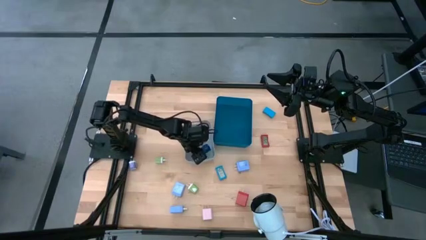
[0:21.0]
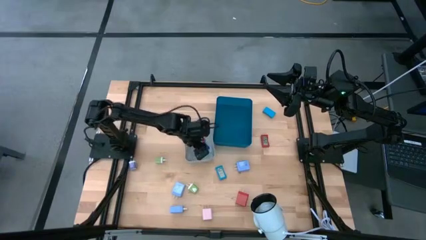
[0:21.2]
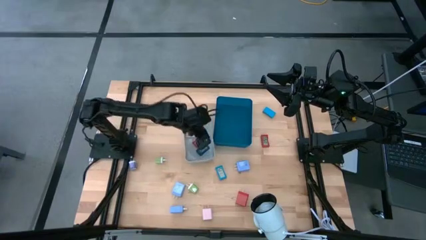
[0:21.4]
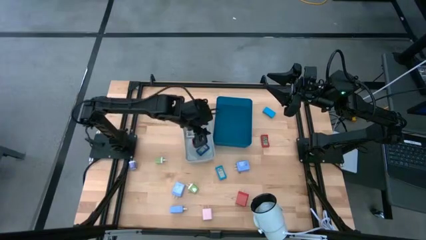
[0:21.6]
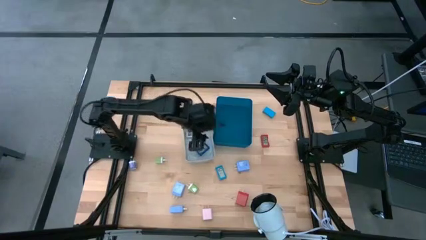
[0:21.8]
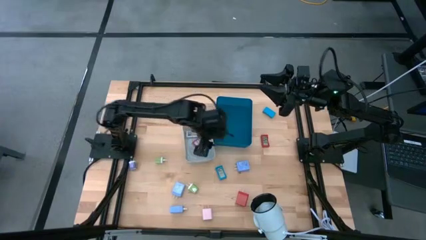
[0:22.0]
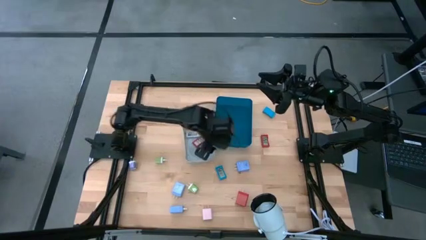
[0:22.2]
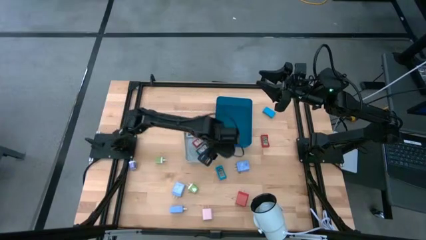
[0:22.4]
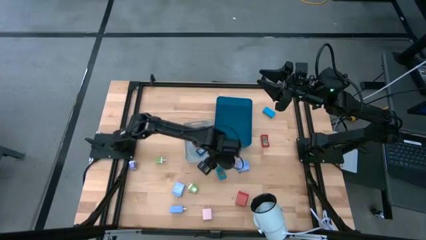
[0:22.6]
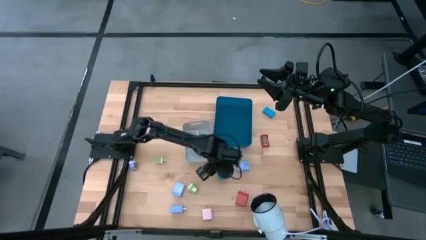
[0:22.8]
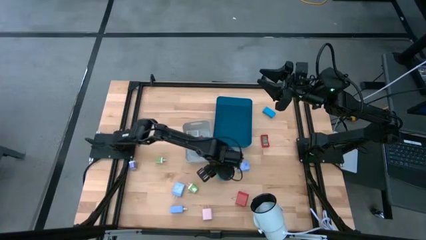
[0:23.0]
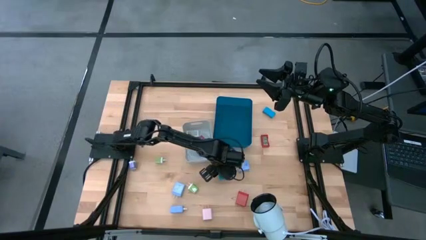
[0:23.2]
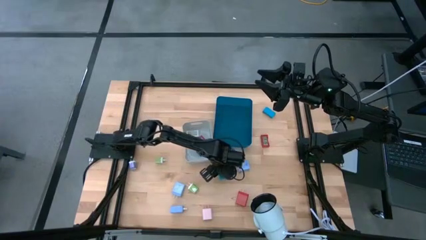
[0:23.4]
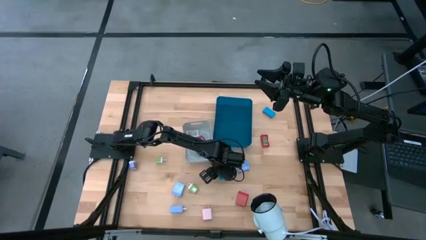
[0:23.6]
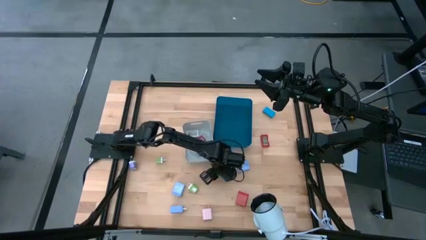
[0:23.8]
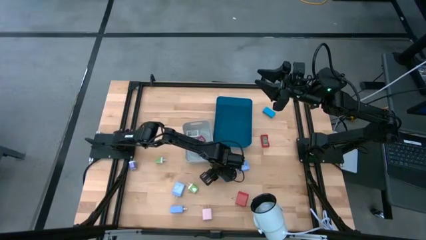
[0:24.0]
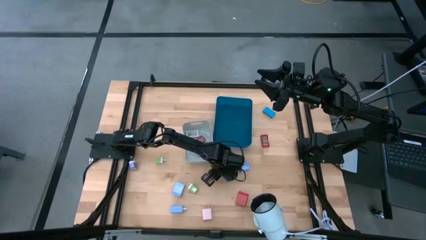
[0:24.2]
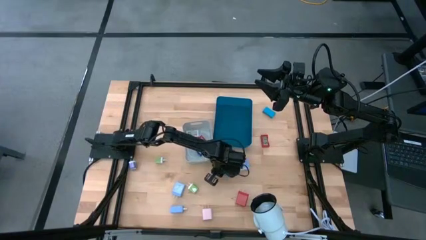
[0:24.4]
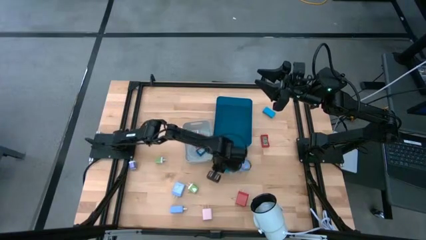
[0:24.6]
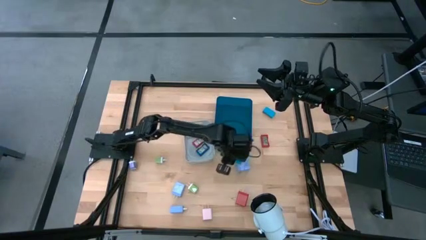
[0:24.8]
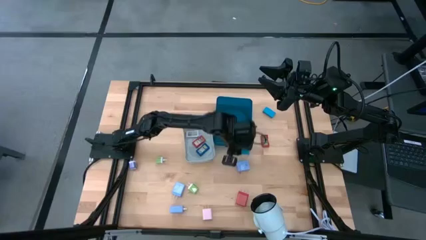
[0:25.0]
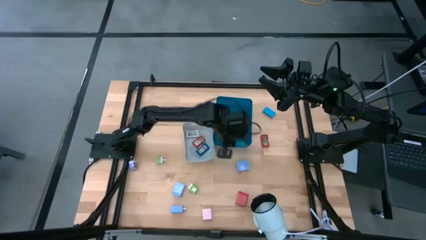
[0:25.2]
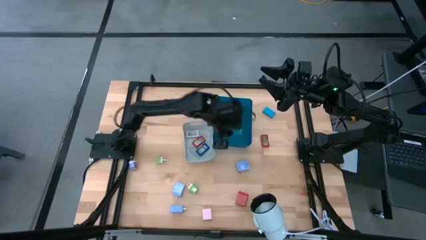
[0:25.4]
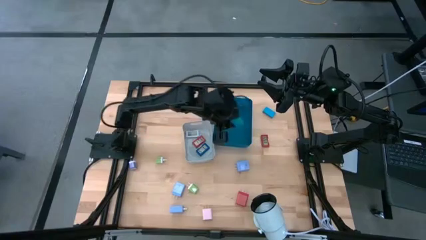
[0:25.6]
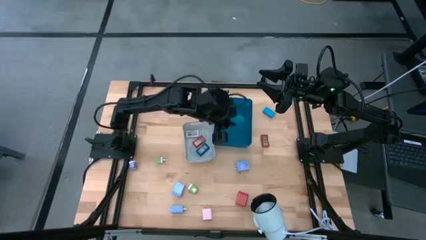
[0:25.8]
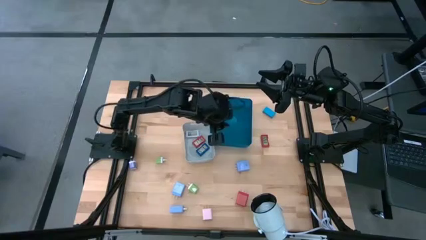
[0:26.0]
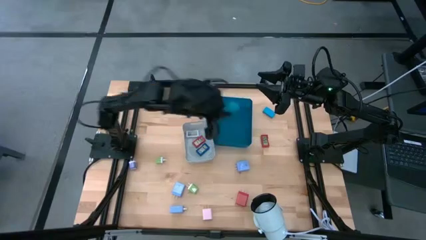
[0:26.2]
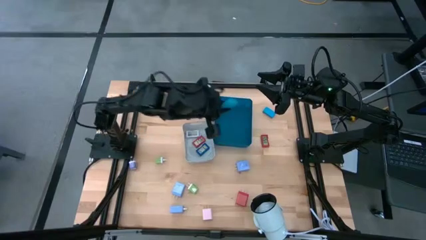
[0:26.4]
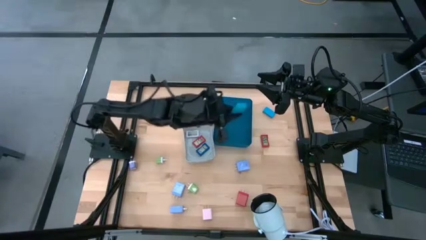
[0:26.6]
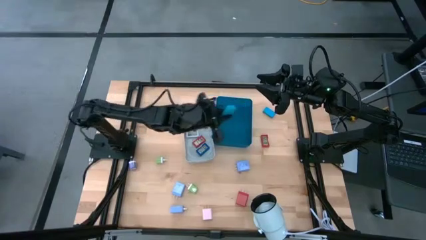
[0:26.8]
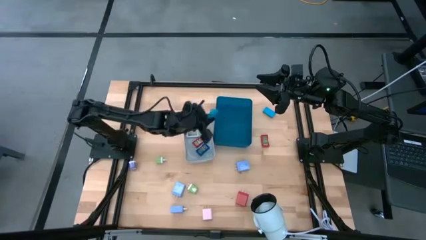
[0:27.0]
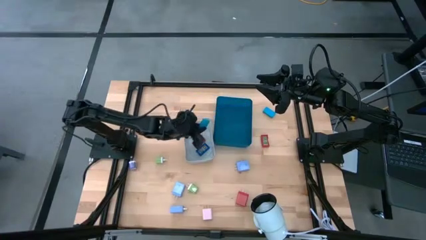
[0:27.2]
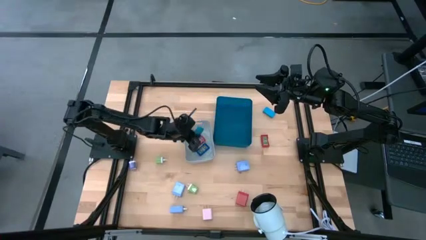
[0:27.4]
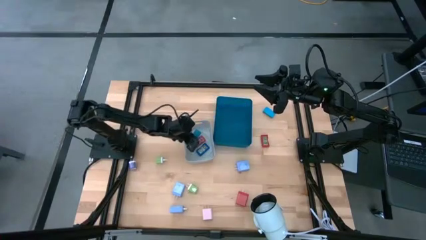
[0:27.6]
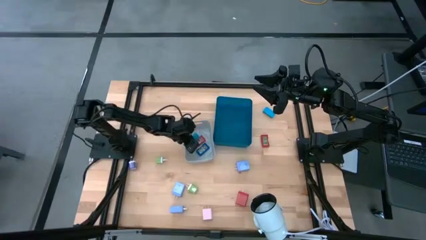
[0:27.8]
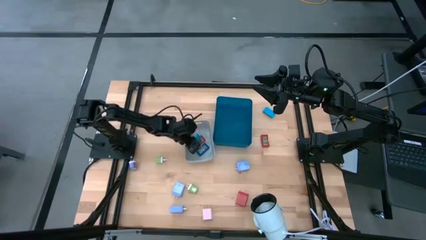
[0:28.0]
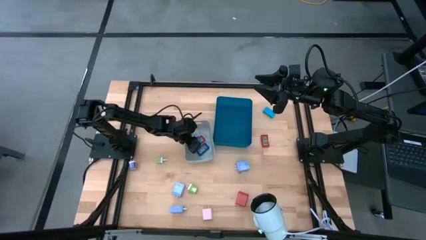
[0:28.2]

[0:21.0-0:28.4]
Task: Pick & Place Office items
Put the left light blue timer into the gray bin

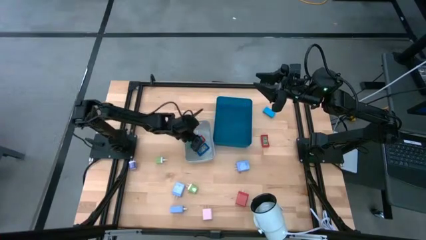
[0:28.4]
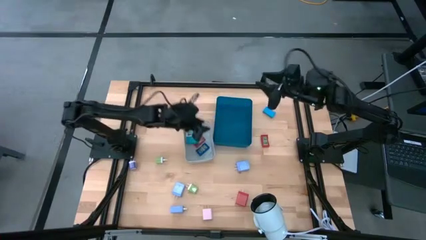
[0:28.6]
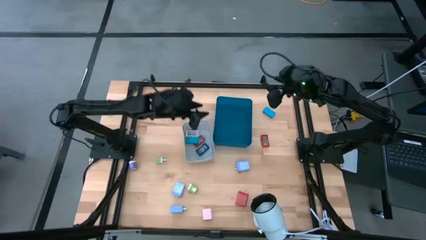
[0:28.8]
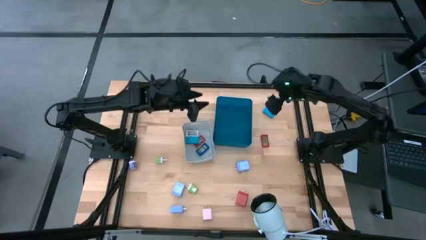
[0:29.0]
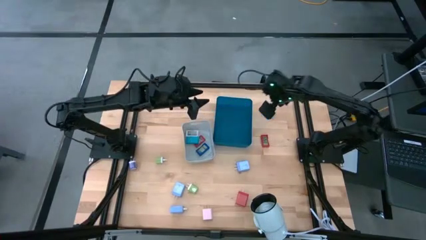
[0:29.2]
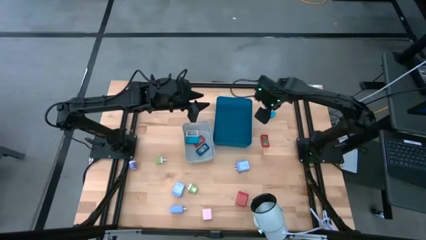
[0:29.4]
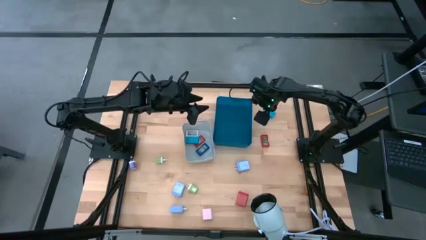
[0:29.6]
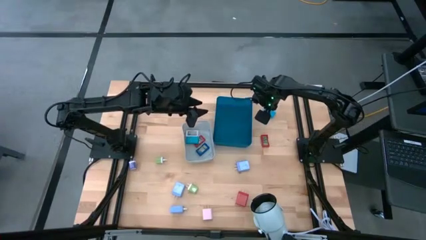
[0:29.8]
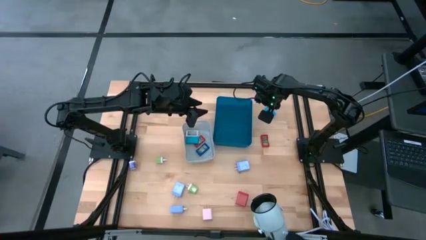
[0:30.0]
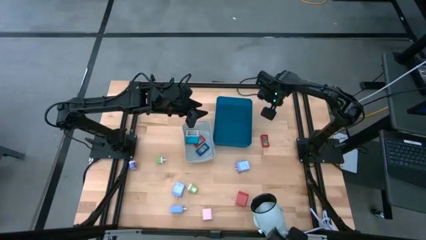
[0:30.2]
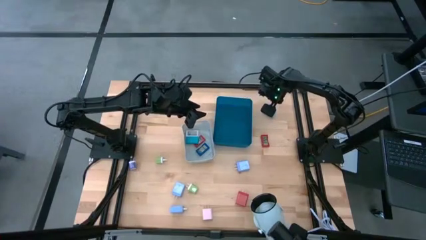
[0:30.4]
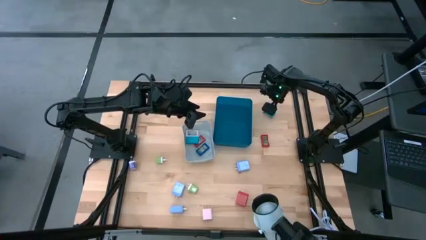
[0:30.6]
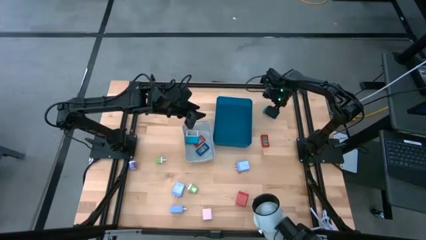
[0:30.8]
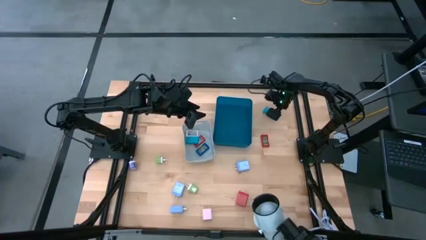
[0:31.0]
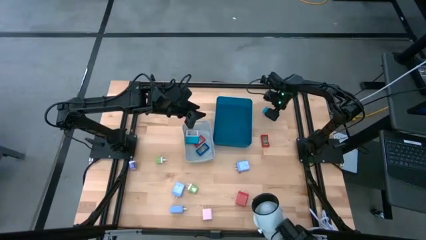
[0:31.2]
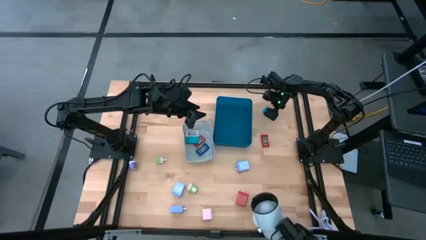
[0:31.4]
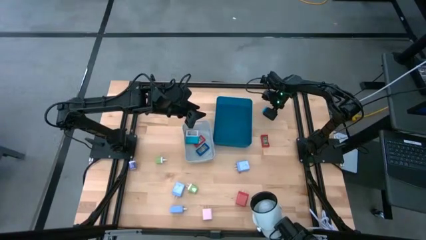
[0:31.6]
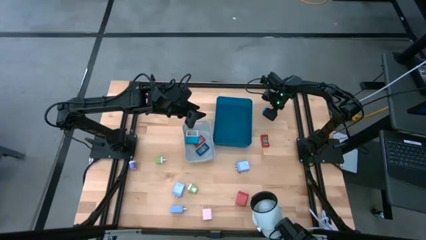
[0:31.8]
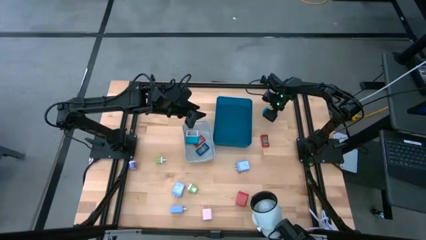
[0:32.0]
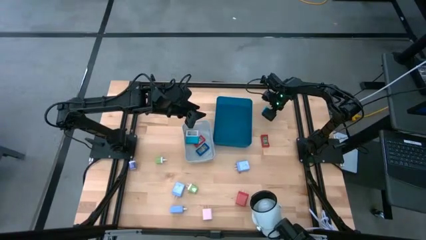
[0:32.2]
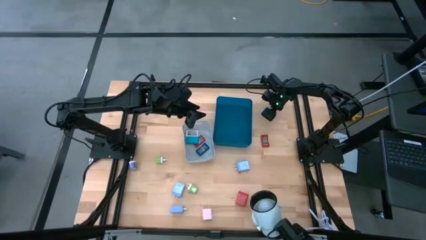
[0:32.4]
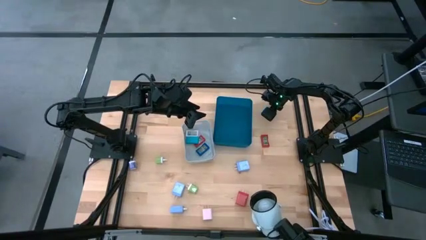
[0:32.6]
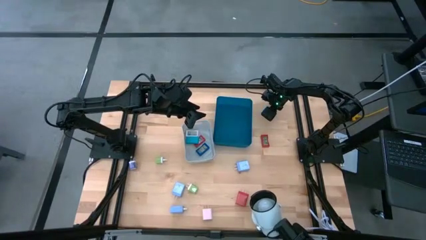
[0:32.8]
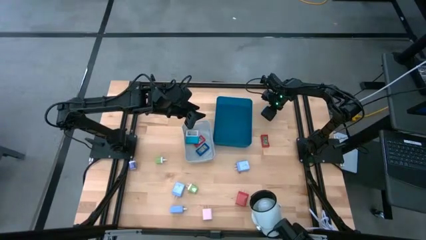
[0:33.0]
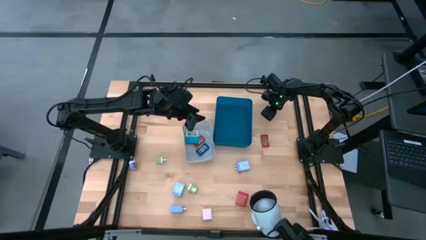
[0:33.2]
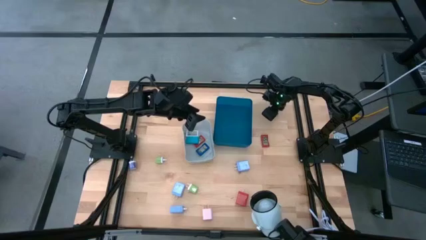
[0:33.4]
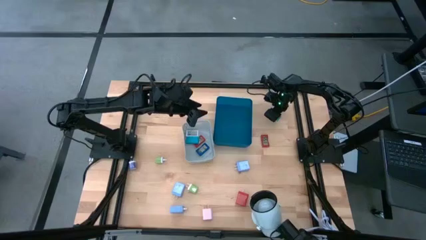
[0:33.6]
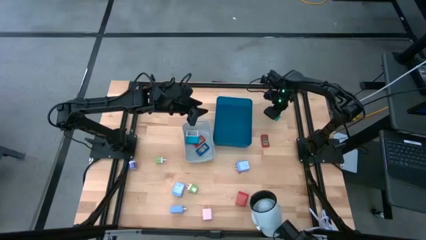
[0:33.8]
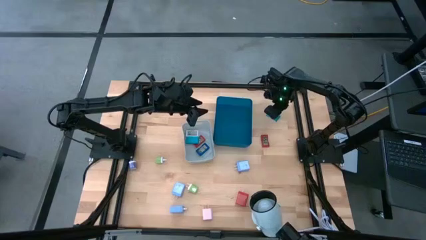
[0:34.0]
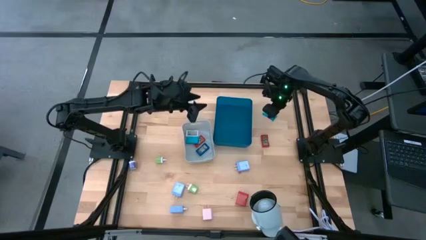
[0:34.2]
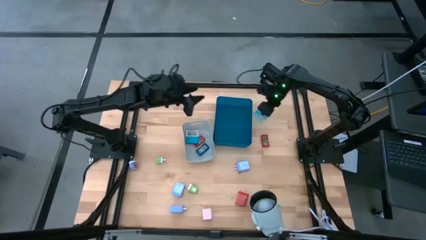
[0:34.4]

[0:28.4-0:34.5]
Put the light blue timer into the gray bin

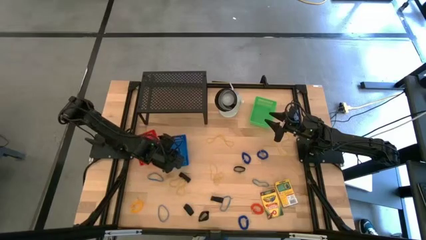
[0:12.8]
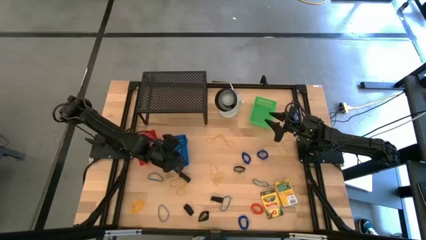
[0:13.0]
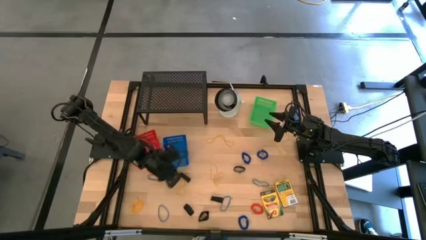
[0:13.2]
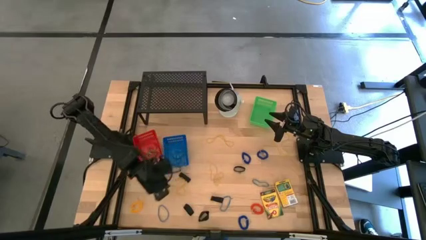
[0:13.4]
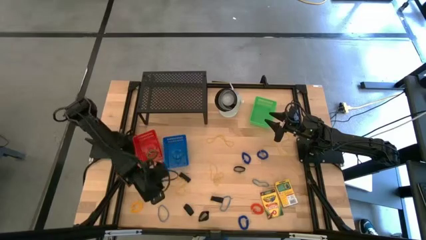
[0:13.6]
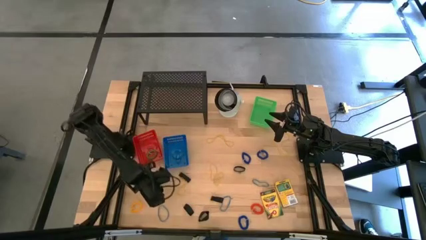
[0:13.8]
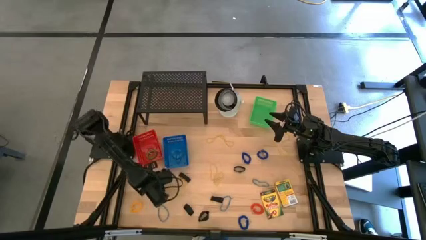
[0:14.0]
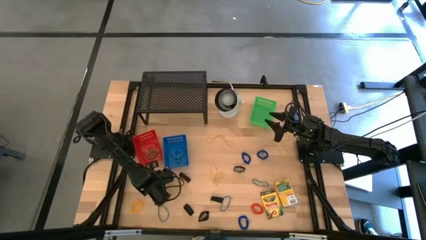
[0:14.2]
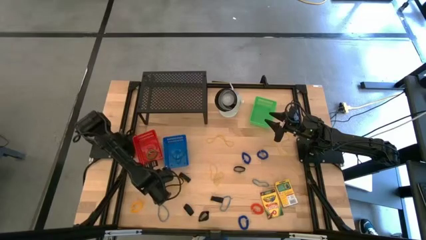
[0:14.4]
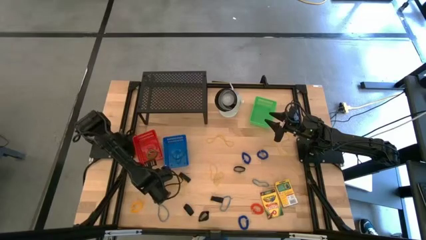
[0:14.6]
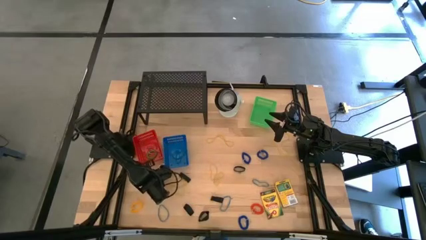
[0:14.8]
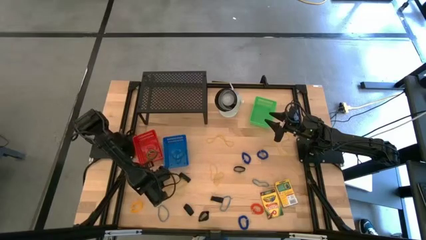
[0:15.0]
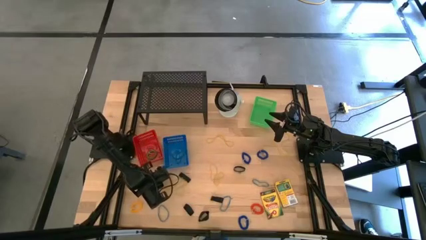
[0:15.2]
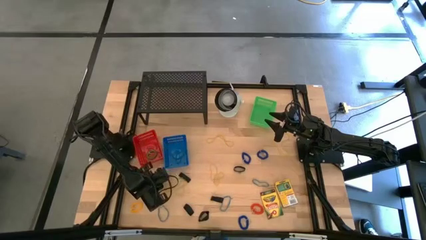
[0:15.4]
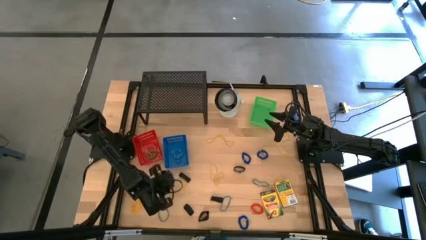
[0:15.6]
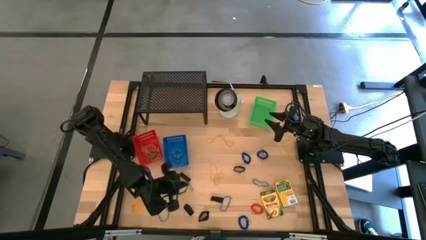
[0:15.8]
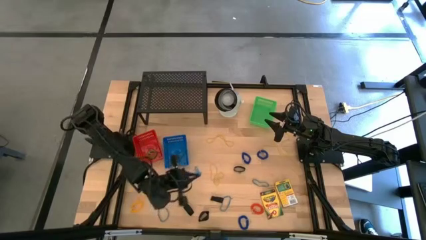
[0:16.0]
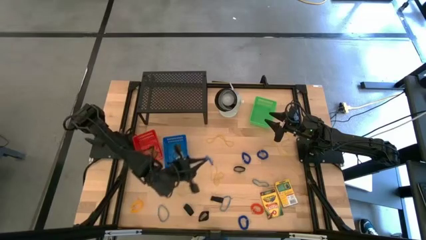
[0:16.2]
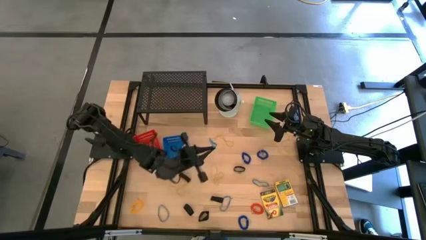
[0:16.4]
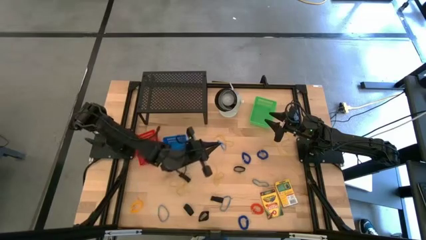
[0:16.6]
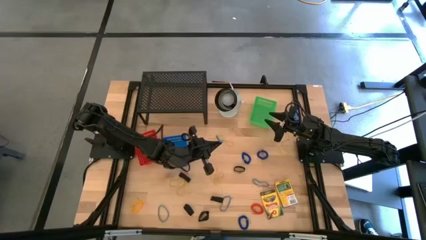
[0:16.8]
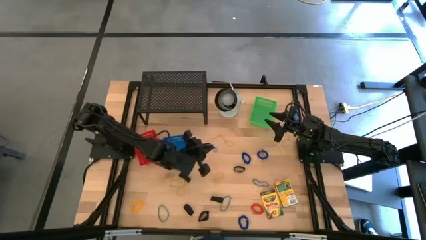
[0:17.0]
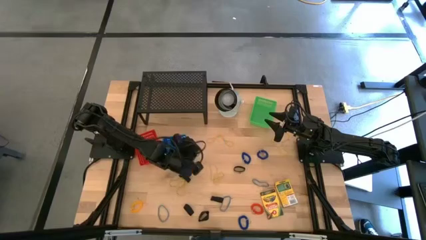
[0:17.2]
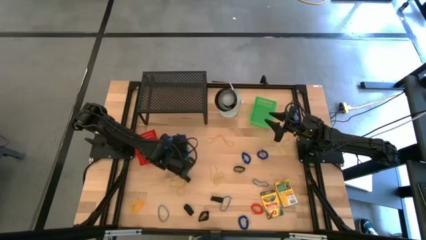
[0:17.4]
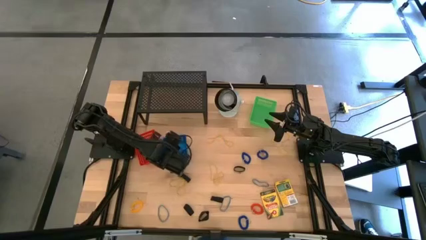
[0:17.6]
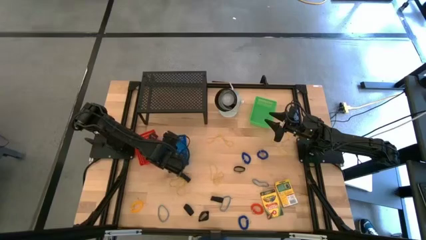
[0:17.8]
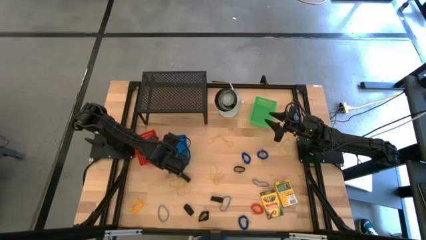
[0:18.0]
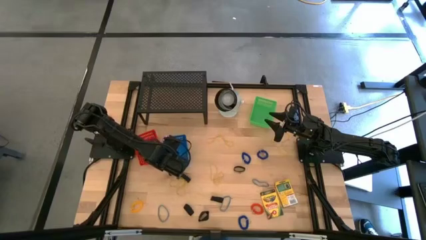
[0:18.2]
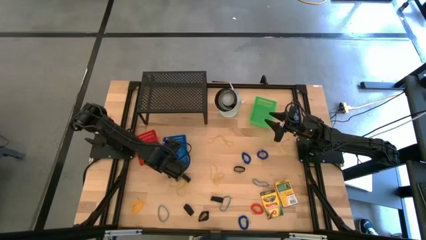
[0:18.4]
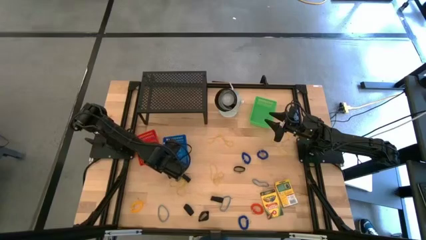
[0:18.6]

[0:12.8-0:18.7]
Task: Pick & Place Office Desk Supplies
Put the blue rubber band into the blue bin
